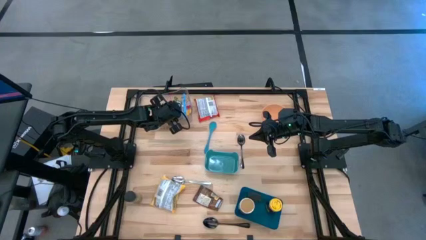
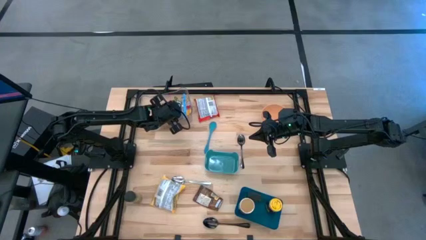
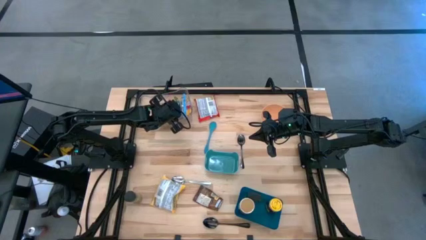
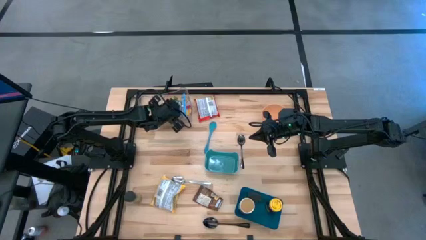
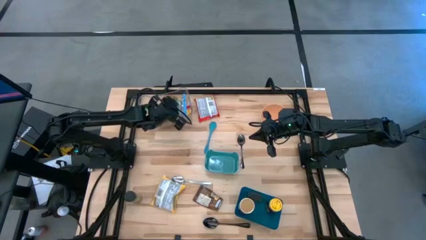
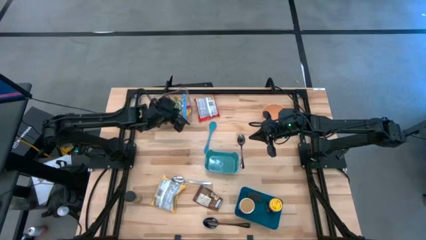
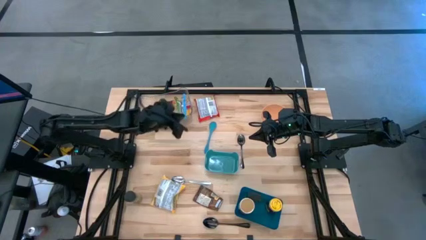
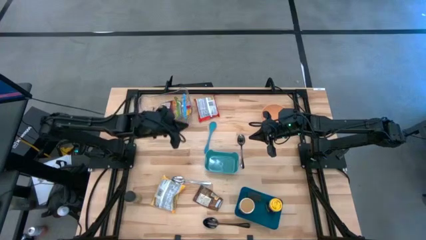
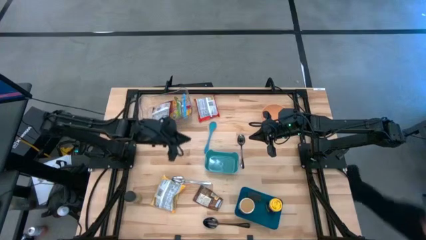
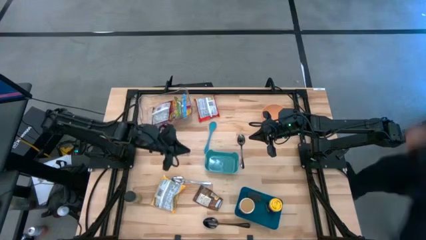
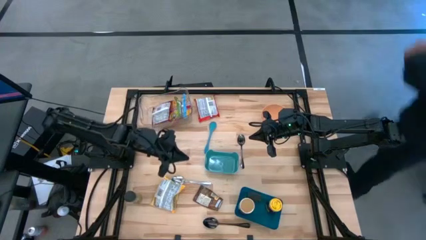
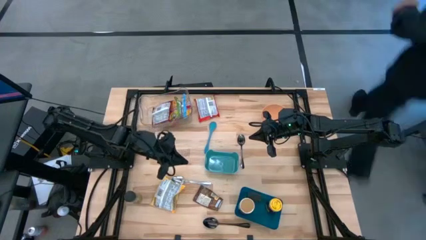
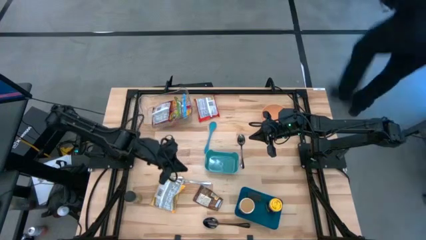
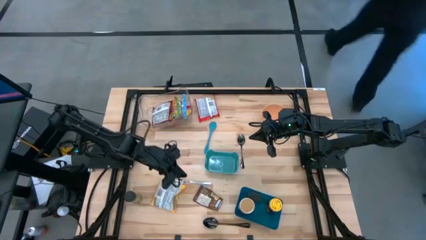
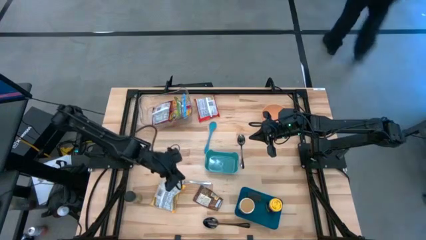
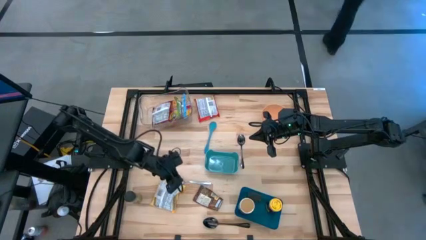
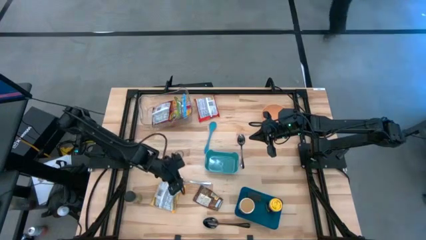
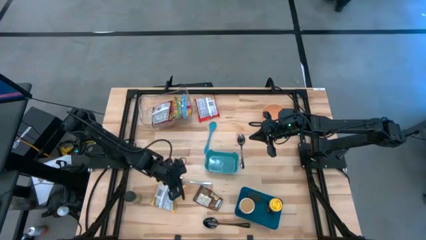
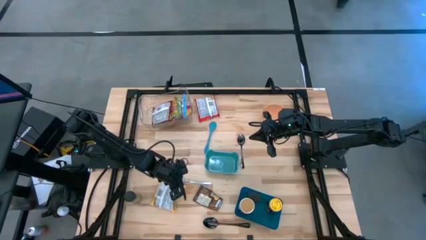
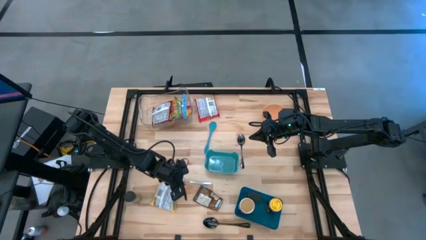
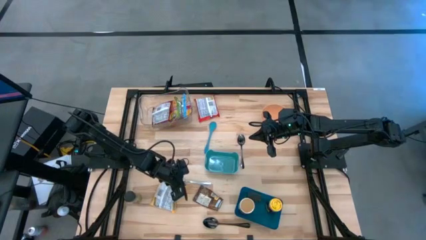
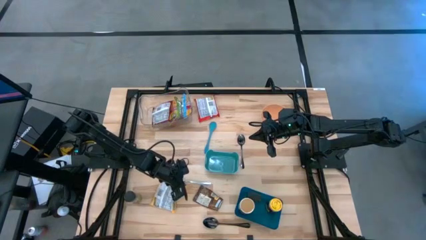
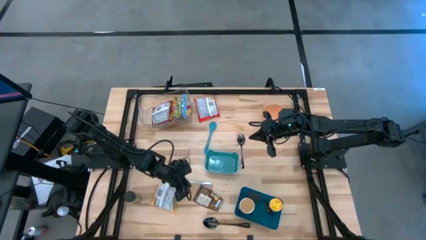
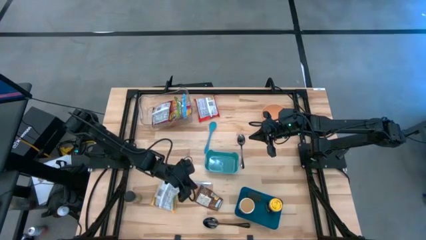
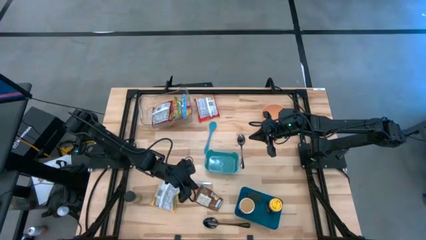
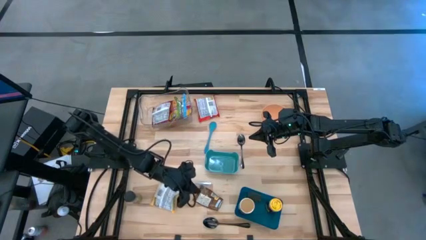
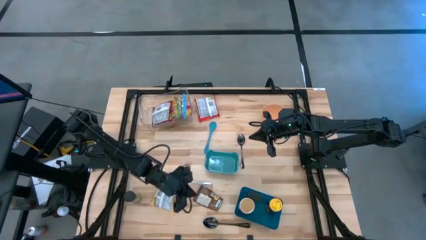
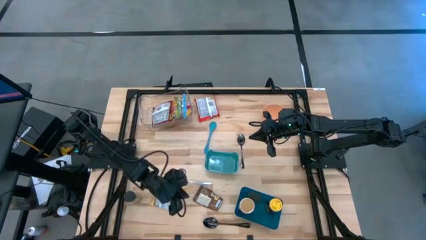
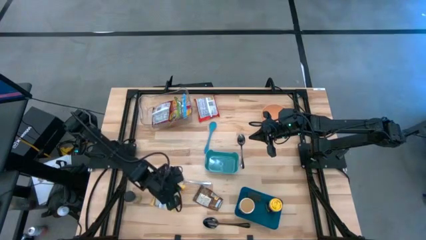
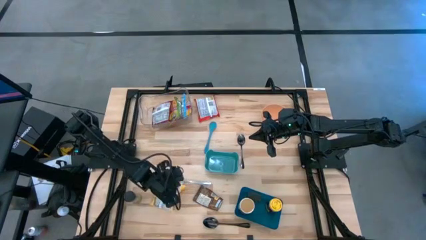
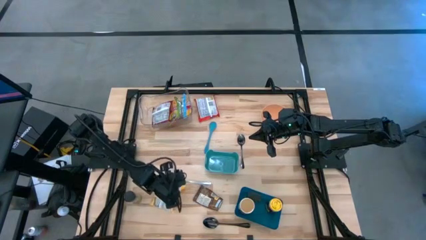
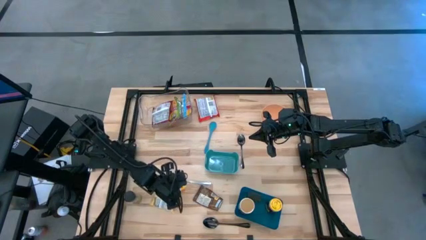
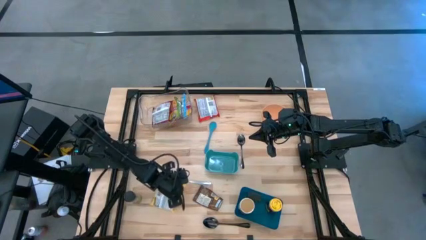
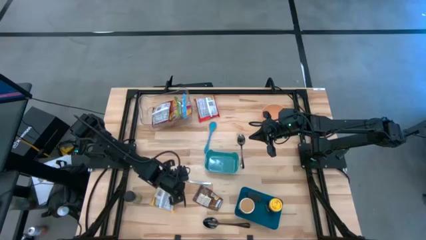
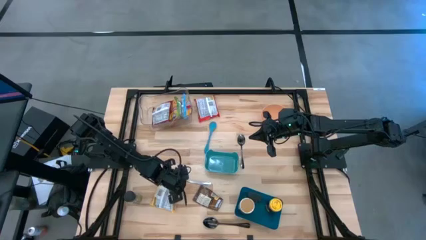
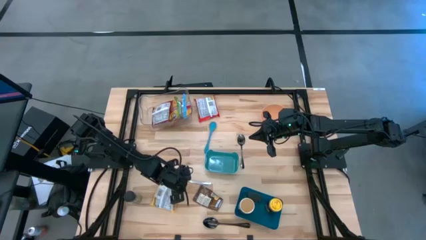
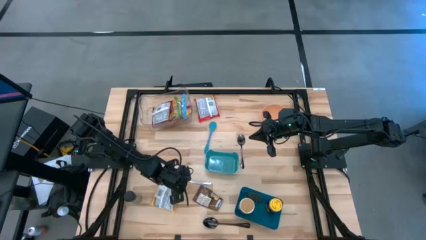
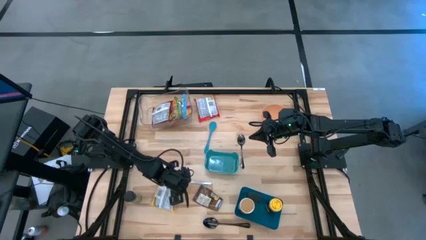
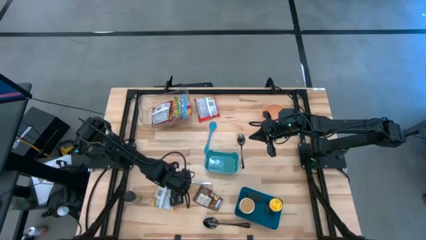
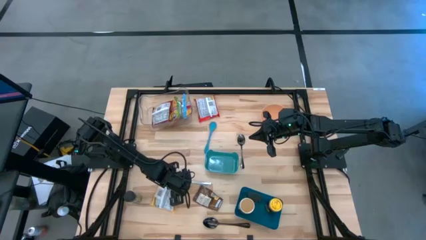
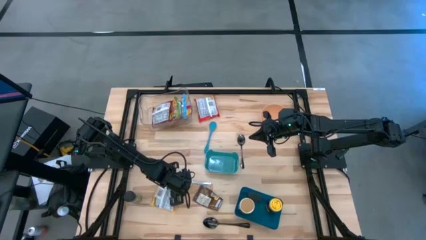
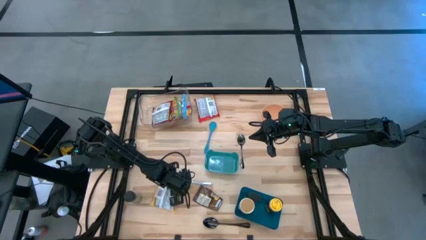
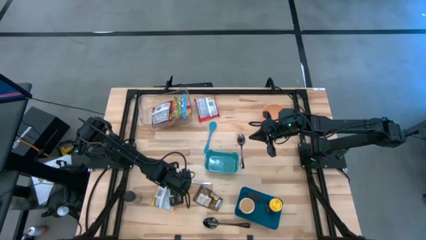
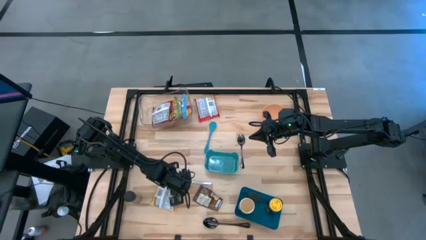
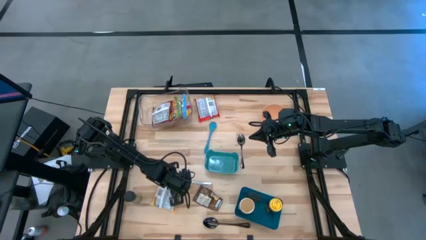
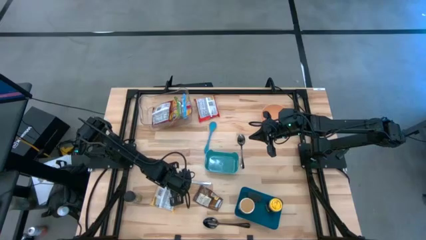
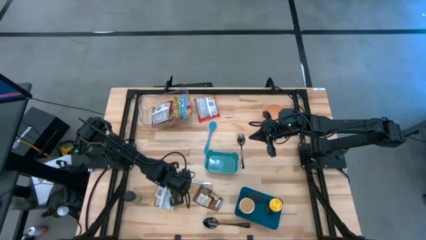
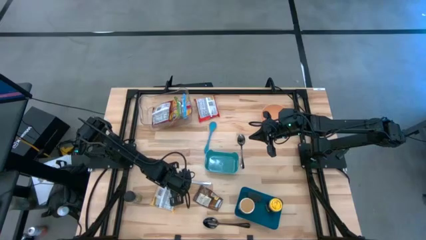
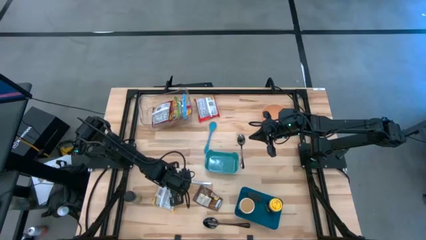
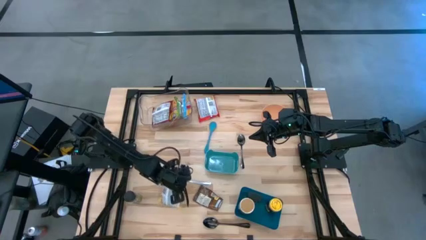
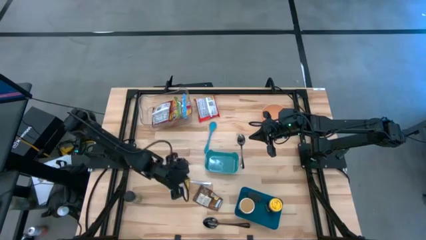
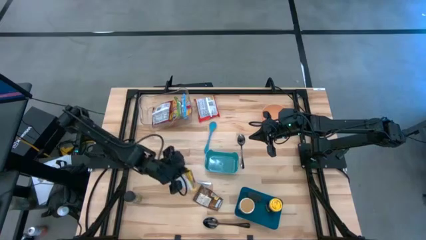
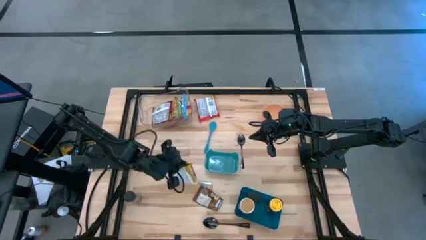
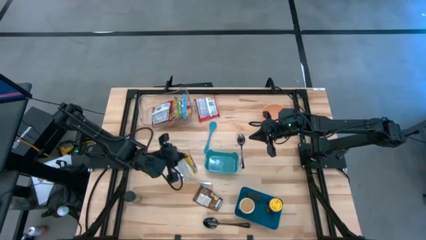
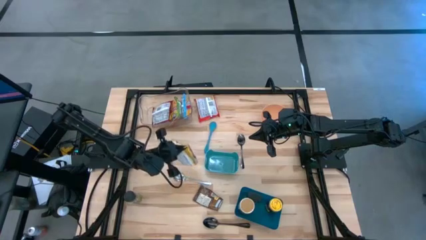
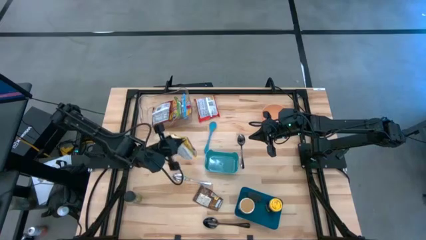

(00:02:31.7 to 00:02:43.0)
Task: Pick & Place Food Item
Put the yellow noodle pack into the transparent bin
